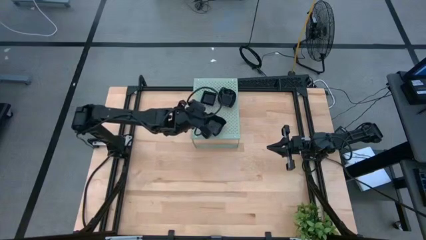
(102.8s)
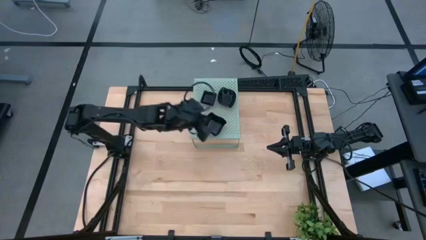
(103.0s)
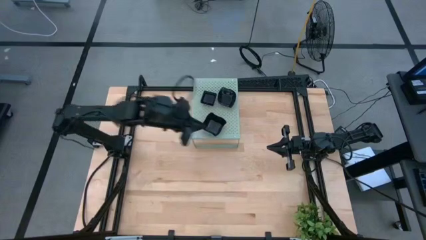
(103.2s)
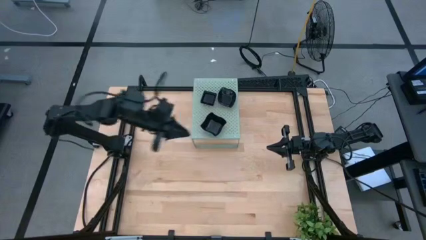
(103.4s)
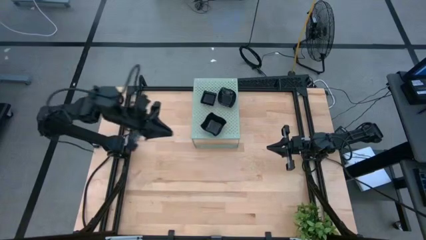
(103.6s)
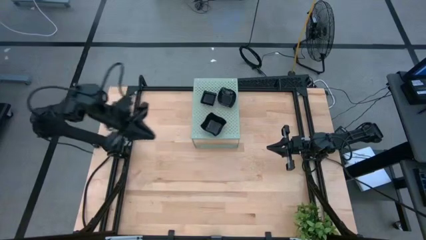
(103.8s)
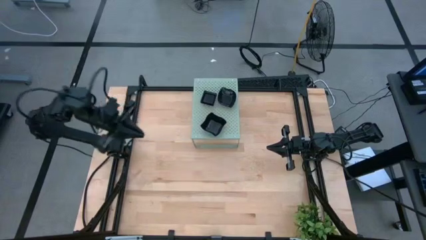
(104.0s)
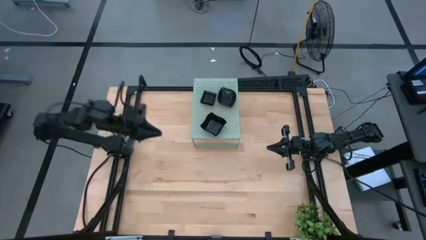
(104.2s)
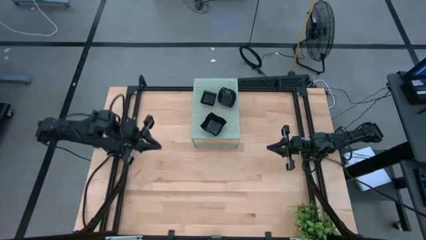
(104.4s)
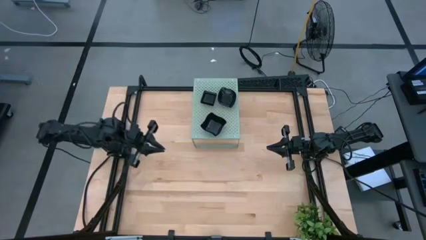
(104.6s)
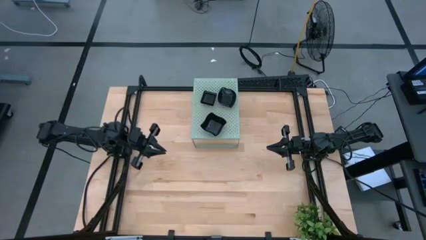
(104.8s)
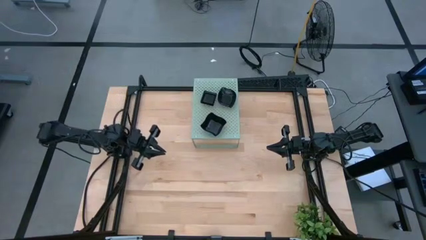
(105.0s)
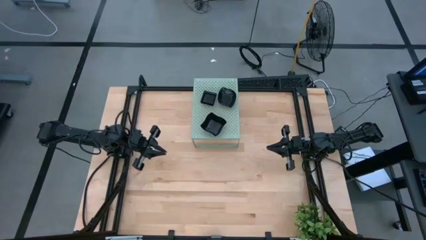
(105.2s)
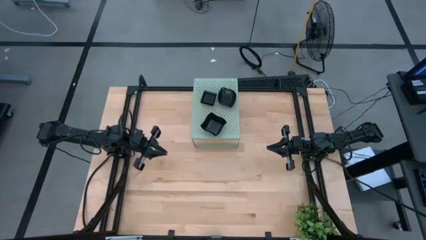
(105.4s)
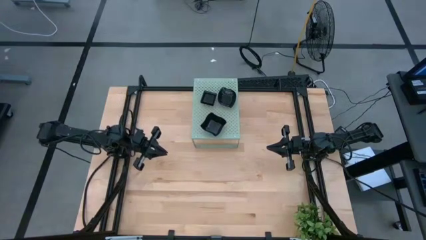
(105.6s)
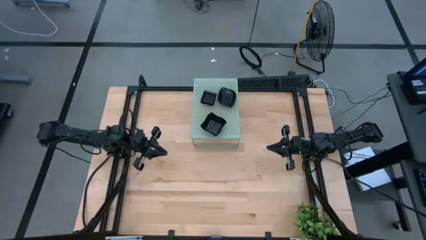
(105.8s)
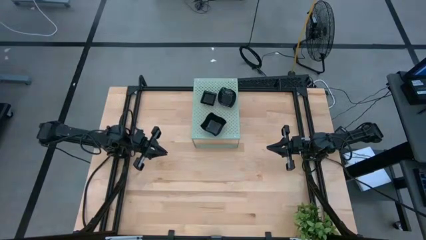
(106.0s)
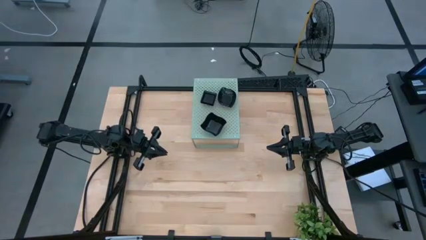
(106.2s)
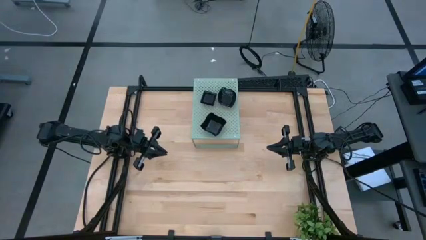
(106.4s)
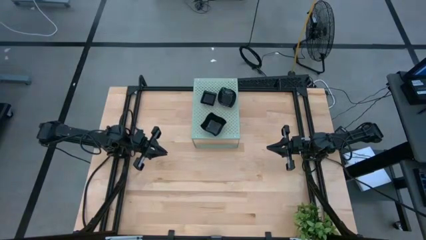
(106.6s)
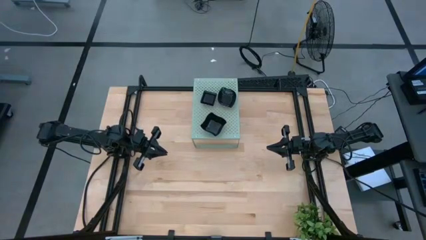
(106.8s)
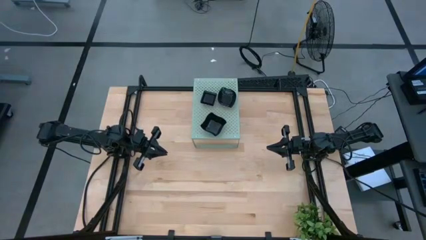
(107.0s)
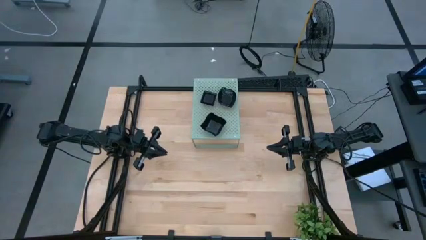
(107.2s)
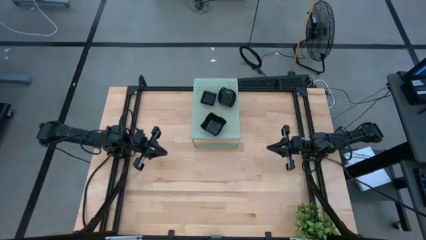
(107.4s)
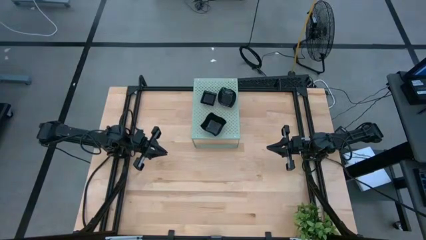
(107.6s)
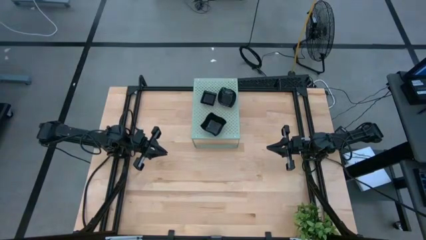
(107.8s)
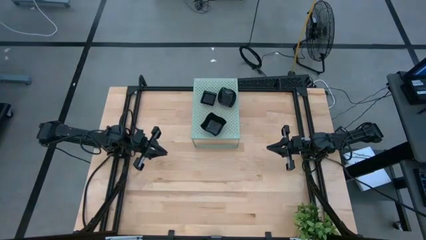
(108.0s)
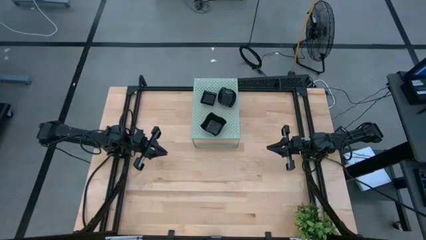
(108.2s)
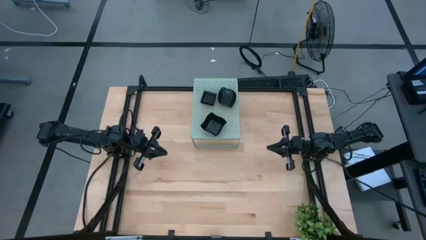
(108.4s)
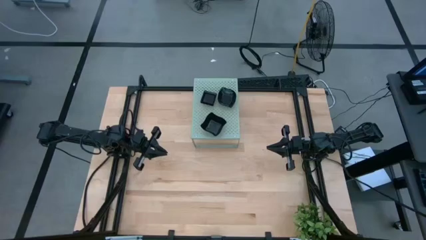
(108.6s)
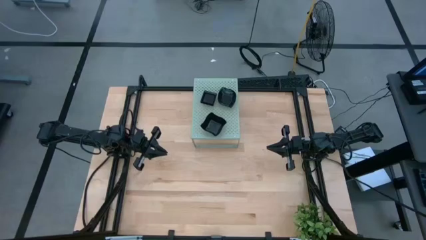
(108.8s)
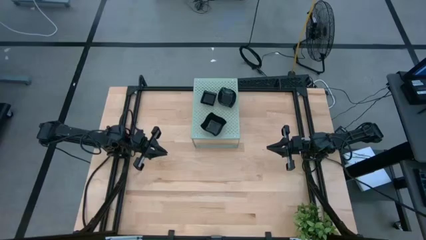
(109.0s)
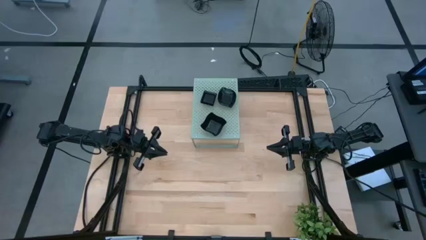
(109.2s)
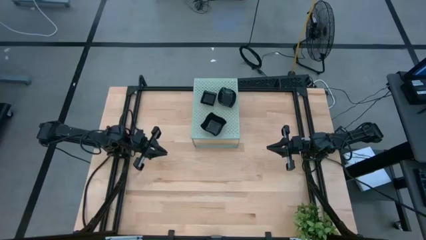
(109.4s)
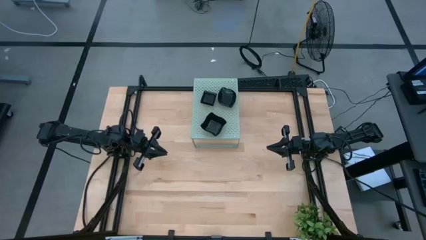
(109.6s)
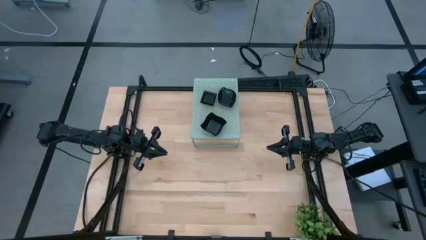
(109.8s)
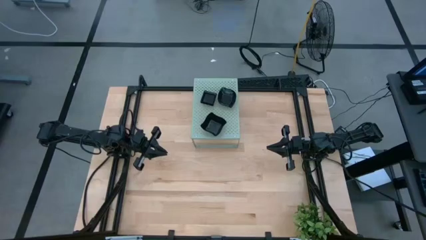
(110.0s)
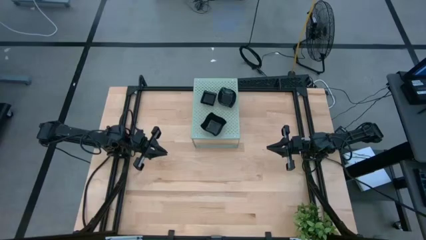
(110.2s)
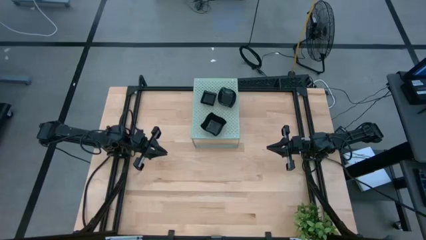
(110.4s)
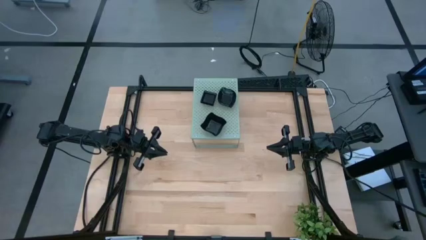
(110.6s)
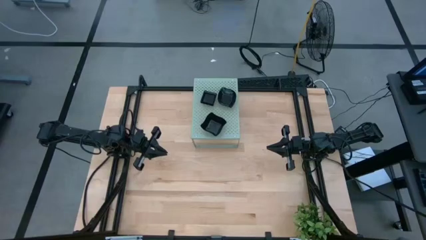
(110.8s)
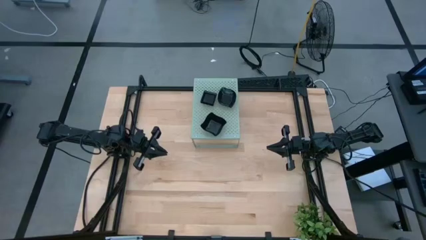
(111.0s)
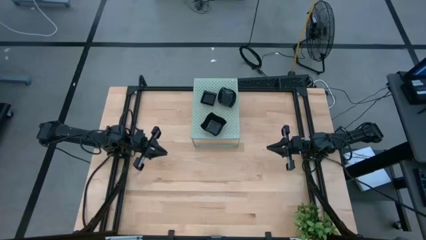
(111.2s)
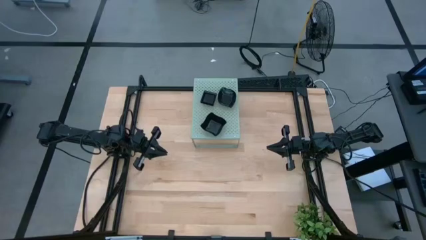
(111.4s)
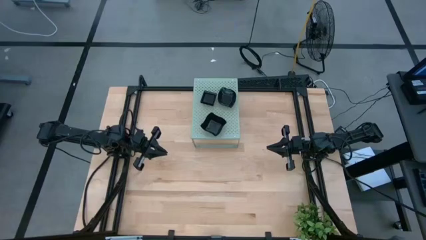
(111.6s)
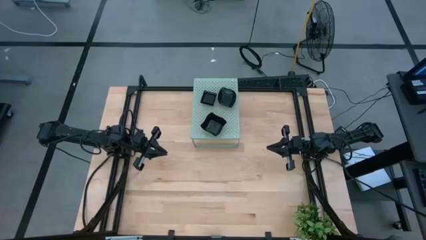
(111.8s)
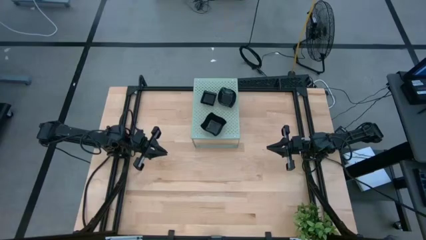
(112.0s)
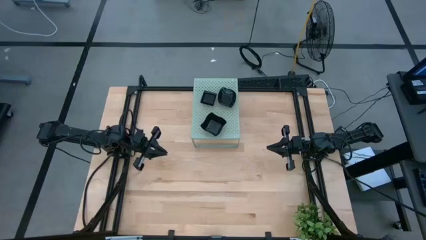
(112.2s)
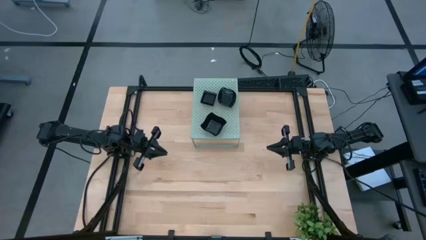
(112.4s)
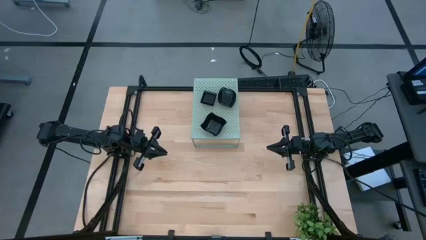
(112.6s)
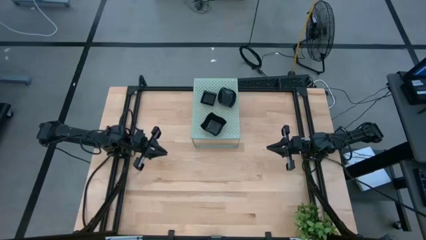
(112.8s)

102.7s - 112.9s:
Task: Pick & Place Mini shaped plates
Return to Home Position

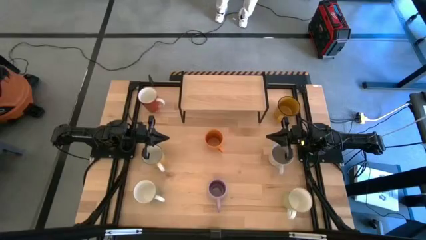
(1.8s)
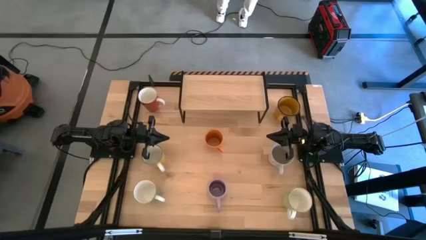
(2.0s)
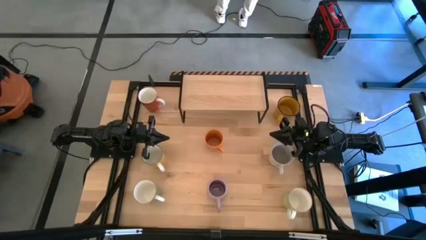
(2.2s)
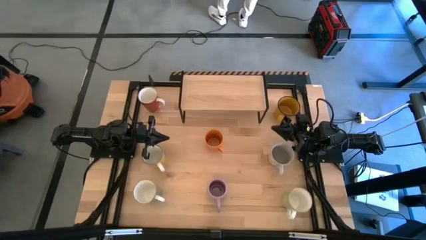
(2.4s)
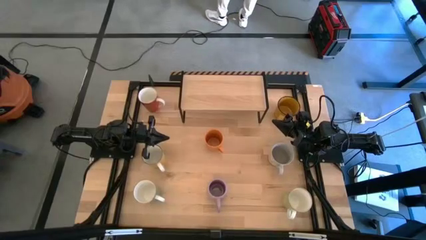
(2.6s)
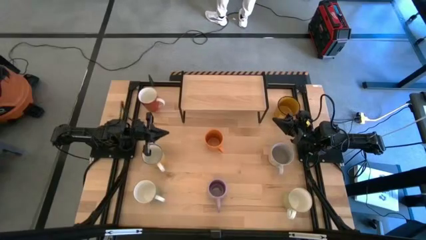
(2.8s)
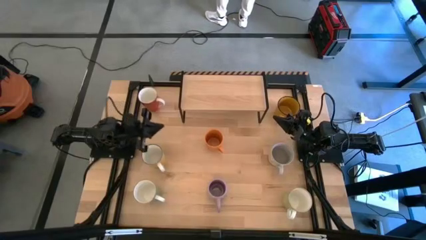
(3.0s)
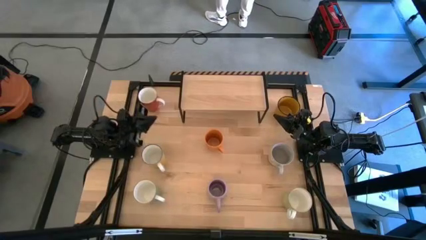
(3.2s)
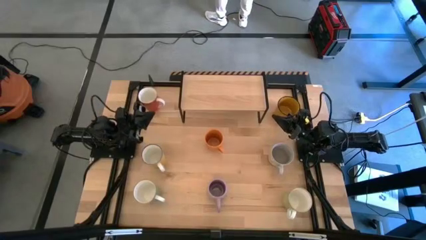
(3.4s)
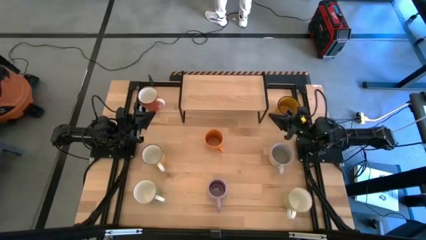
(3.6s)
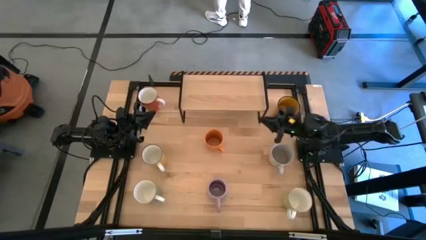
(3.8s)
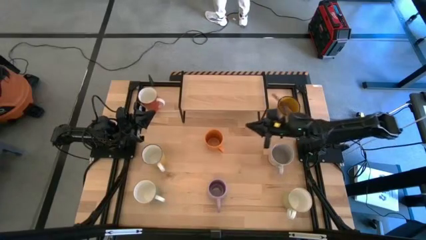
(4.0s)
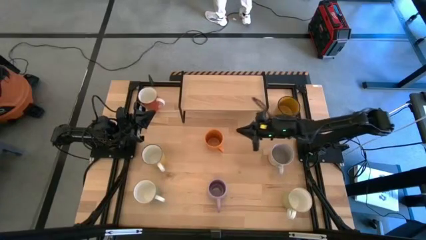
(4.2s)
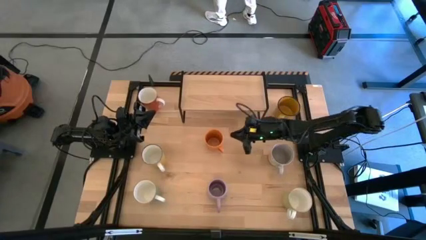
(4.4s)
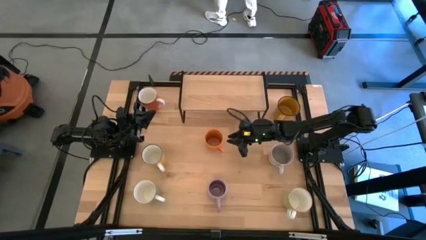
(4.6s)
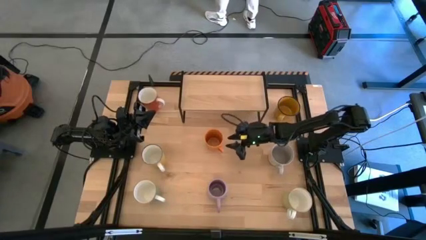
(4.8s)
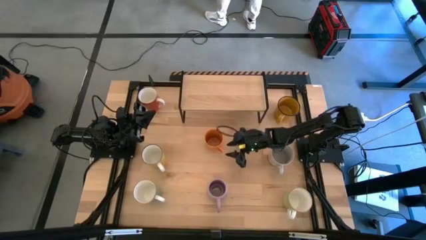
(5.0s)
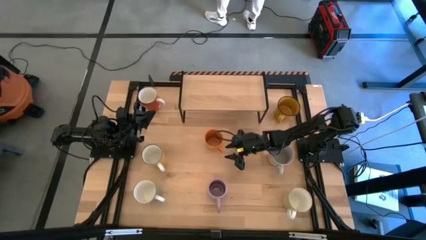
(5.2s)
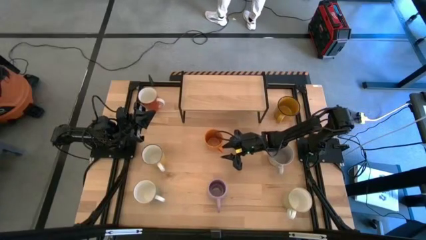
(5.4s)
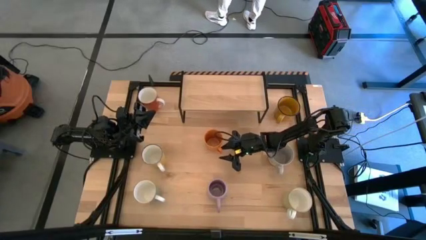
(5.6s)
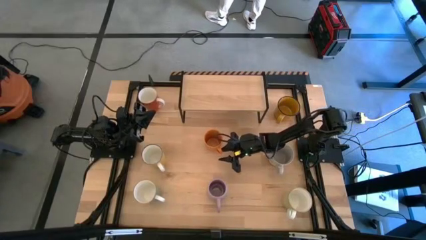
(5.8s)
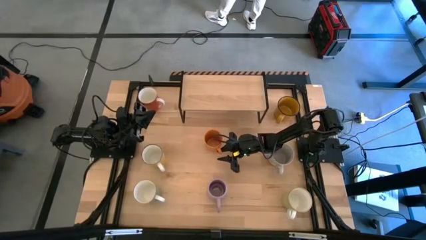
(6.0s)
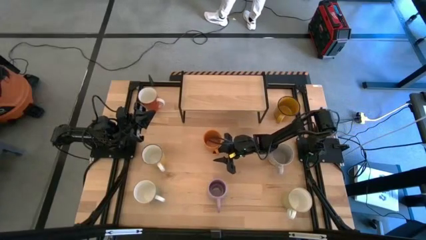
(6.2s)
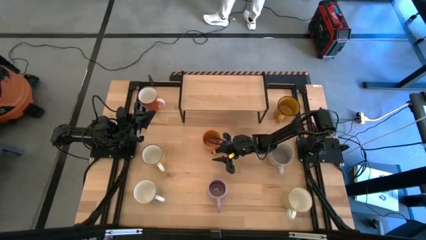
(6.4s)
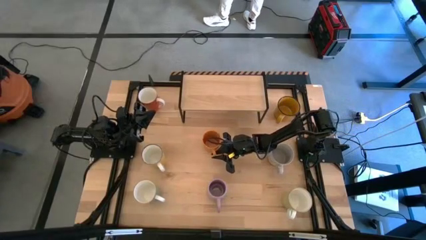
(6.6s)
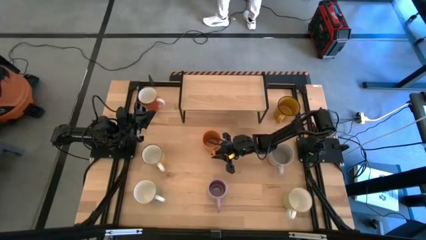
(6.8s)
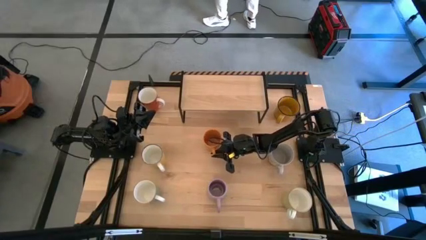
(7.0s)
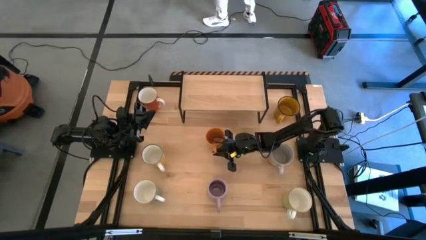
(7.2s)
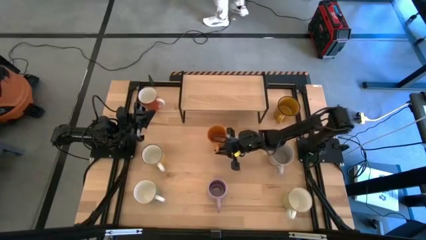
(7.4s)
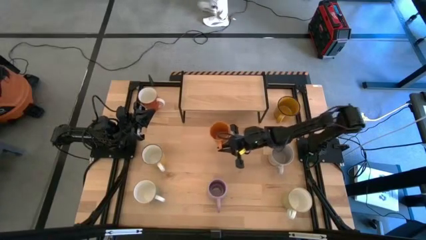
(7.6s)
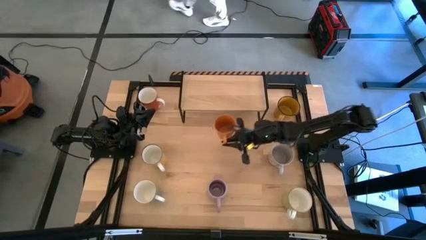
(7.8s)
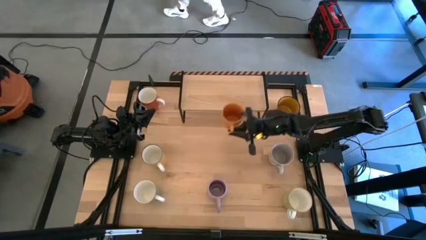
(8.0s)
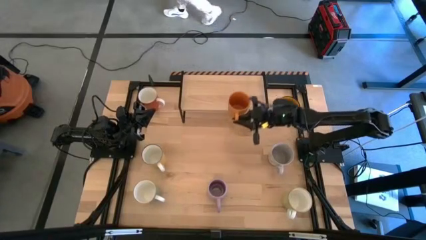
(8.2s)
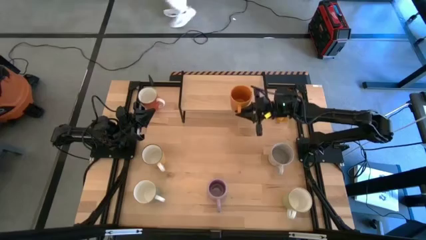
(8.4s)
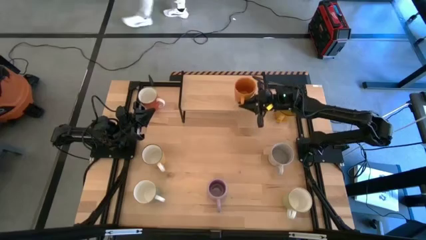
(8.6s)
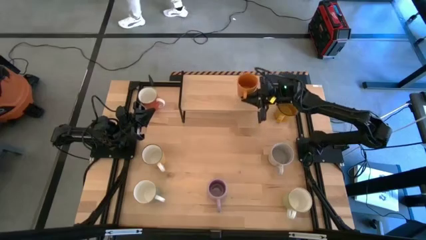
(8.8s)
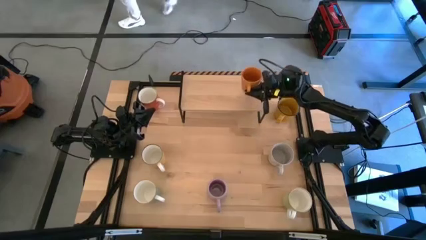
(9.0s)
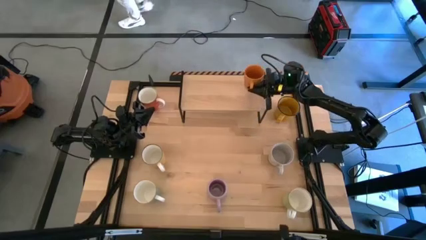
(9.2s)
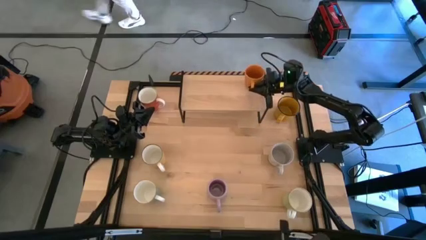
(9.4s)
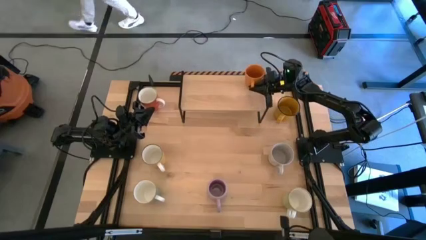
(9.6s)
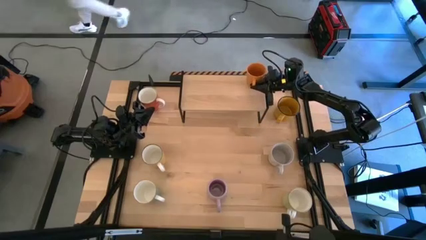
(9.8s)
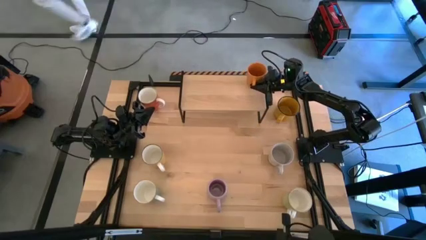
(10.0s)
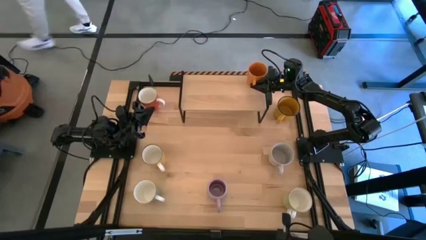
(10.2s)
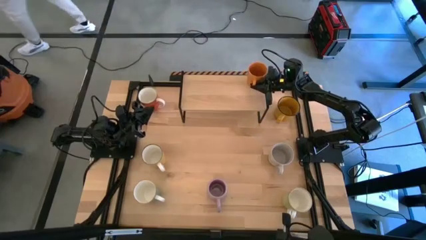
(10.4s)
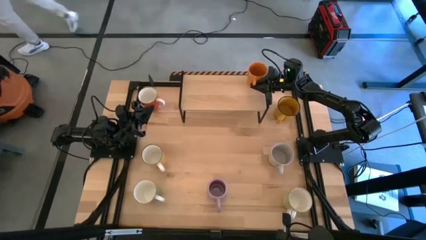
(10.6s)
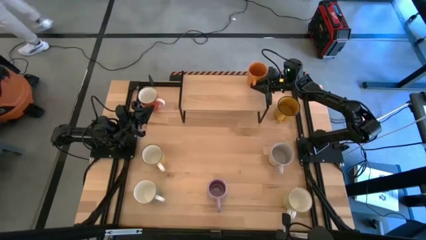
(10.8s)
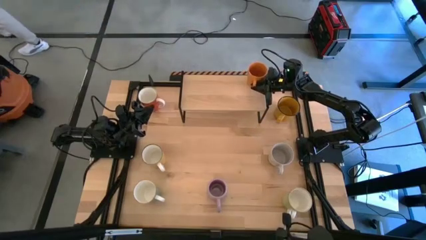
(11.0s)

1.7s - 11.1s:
Task: Place coffee mugs
Put the orange mug on the shelf
